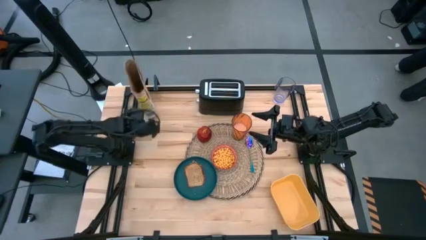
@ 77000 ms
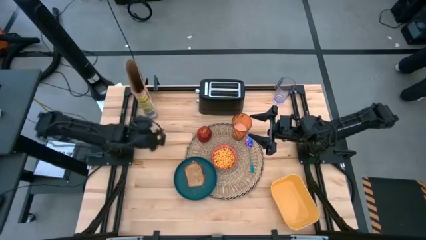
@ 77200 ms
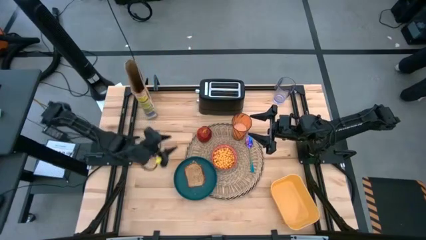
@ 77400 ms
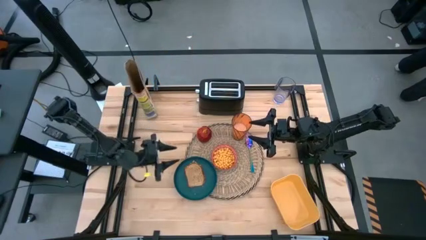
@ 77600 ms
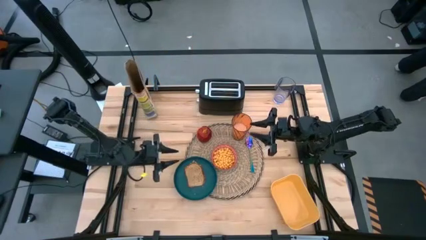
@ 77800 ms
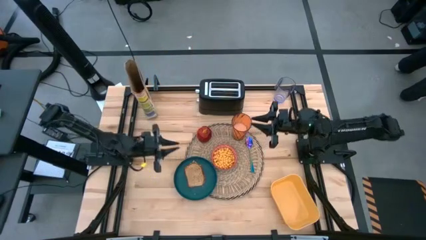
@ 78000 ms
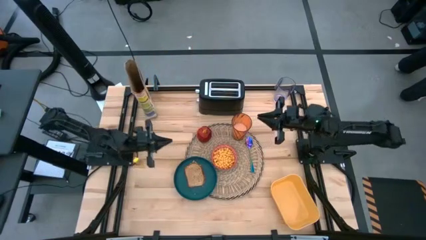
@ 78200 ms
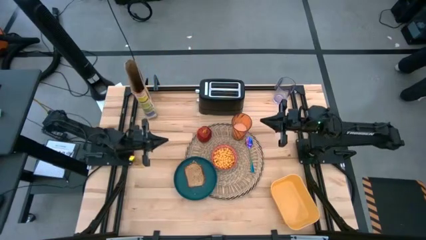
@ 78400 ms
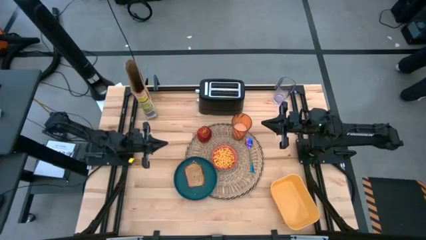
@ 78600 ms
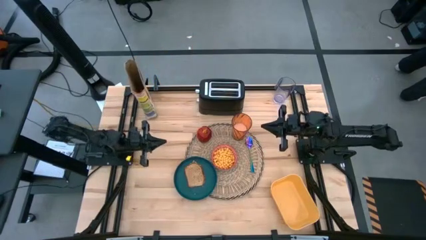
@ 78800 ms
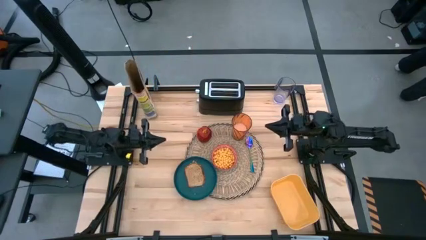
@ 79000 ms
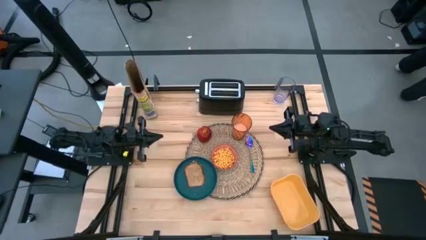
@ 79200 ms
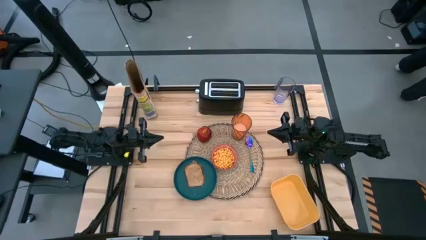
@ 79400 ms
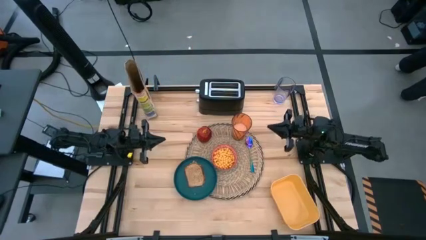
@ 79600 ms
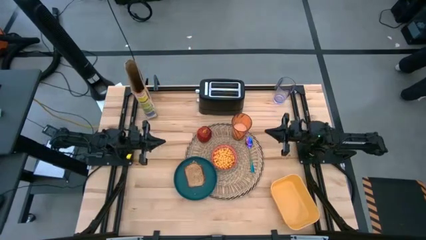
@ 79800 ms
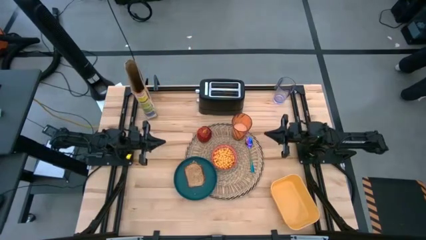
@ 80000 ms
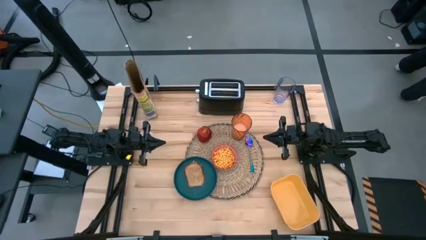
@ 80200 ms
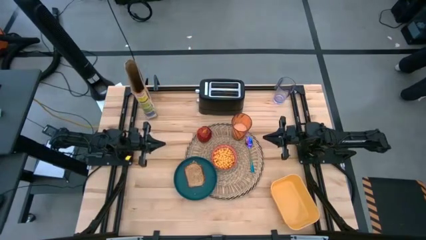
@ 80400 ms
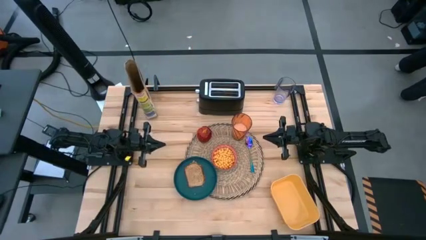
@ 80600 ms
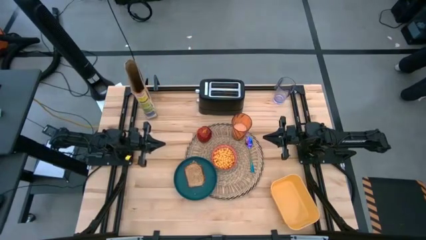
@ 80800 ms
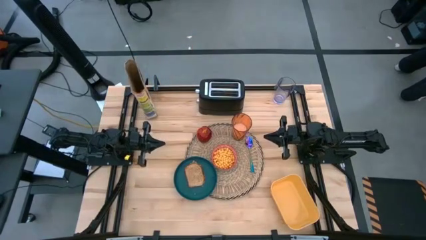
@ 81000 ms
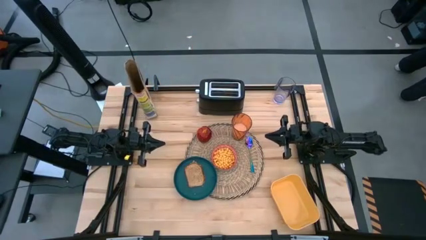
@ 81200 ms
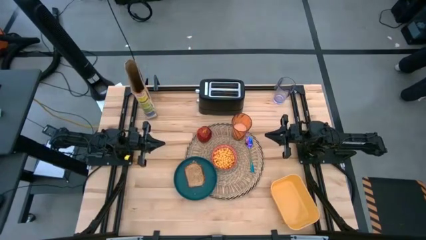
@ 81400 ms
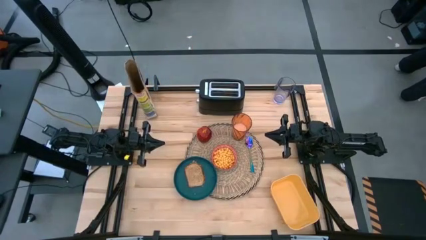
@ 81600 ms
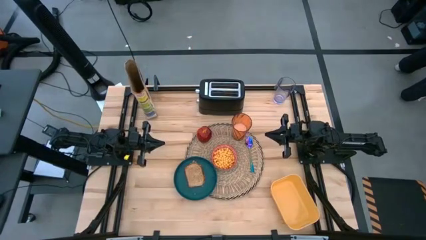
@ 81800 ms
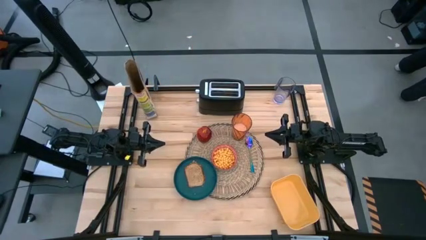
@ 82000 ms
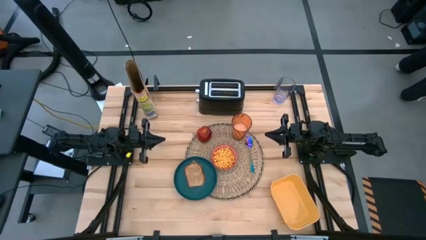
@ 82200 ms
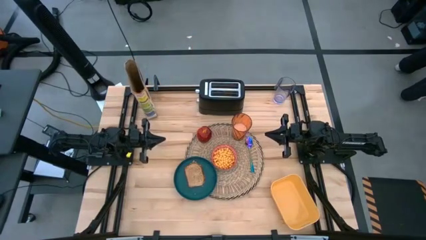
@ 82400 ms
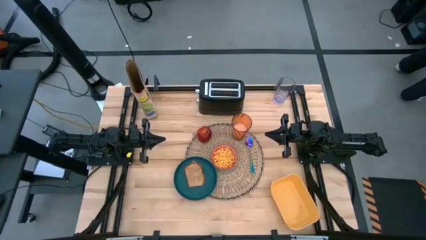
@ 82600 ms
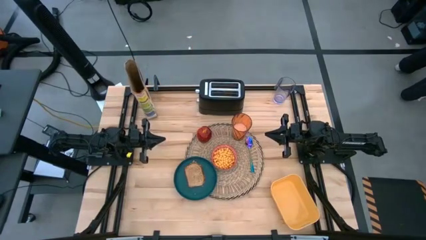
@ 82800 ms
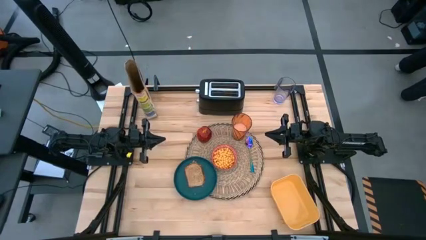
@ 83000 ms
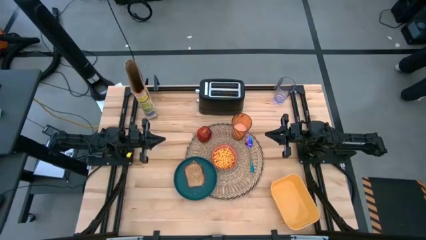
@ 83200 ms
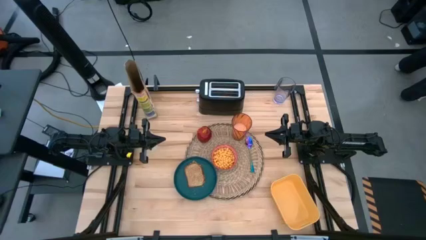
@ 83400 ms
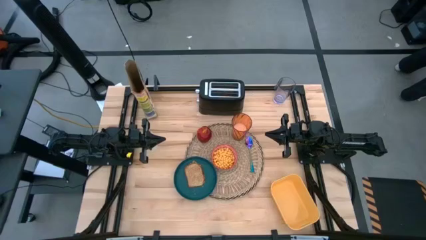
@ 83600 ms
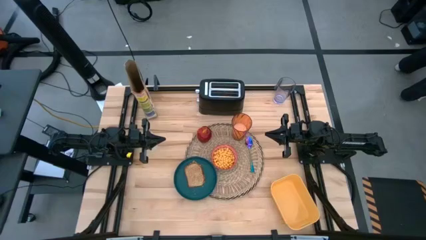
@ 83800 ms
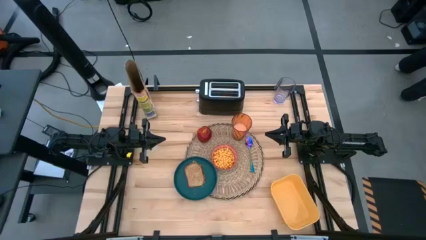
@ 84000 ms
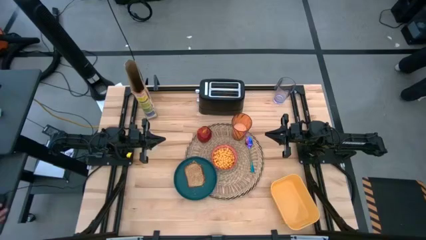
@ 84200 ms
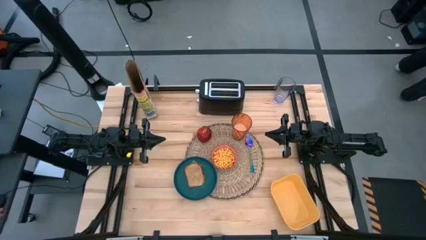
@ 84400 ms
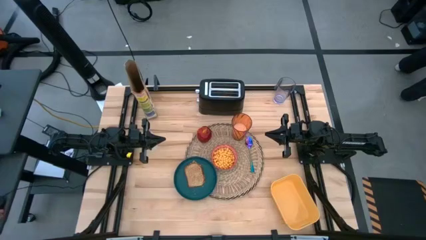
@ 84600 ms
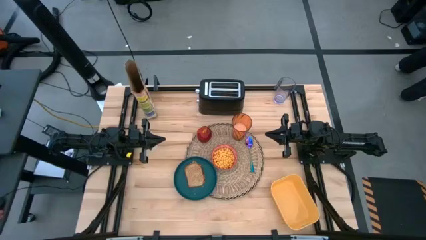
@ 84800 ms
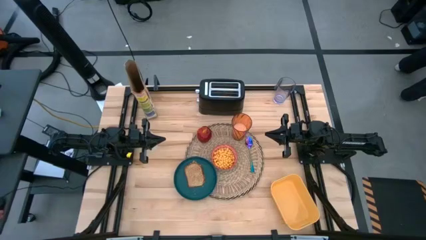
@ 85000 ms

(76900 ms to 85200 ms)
Task: Arrange a breakfast setting
Return to Home Position

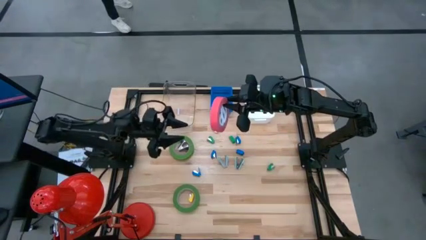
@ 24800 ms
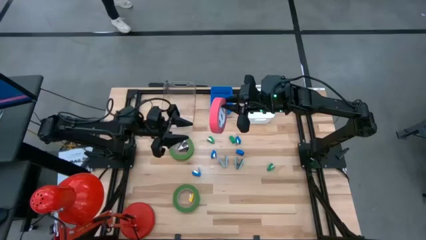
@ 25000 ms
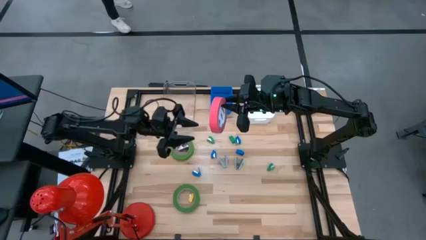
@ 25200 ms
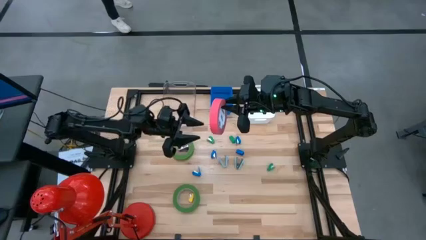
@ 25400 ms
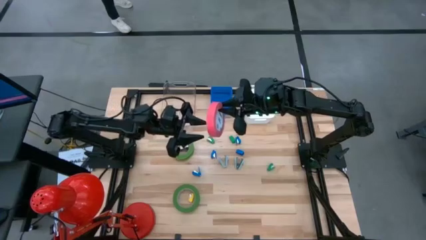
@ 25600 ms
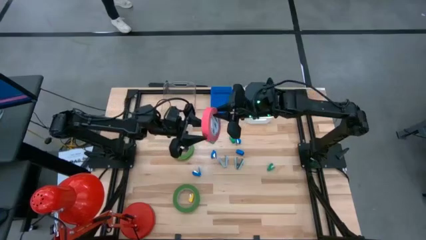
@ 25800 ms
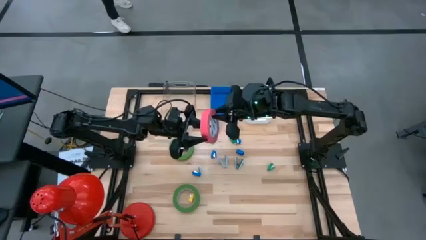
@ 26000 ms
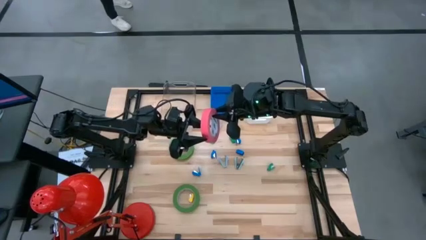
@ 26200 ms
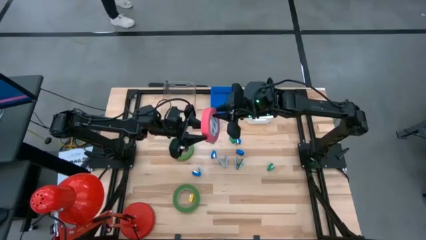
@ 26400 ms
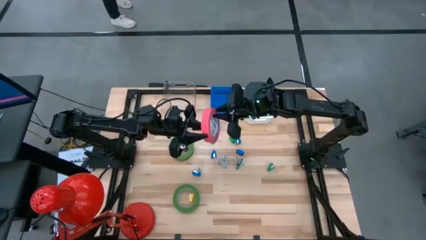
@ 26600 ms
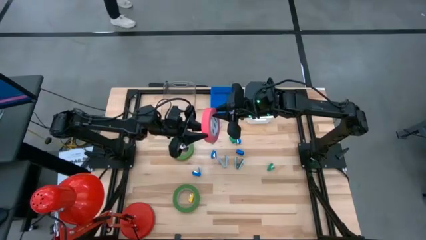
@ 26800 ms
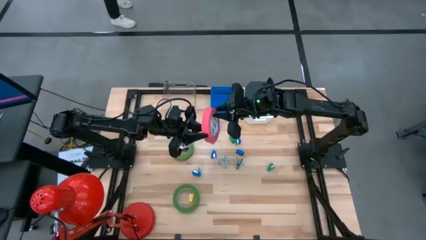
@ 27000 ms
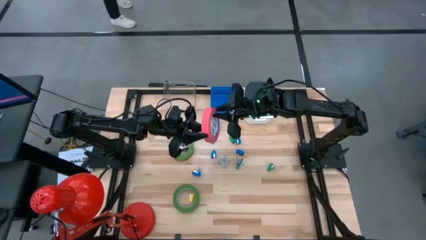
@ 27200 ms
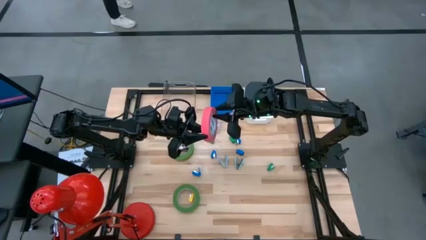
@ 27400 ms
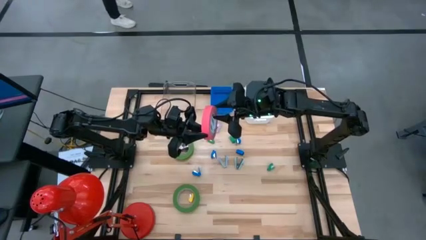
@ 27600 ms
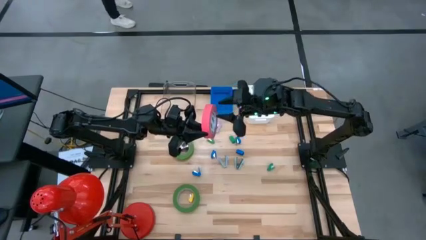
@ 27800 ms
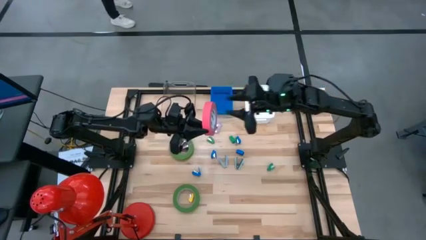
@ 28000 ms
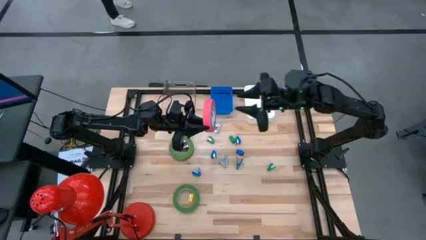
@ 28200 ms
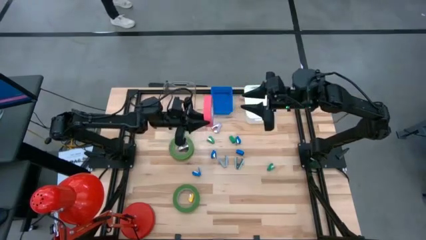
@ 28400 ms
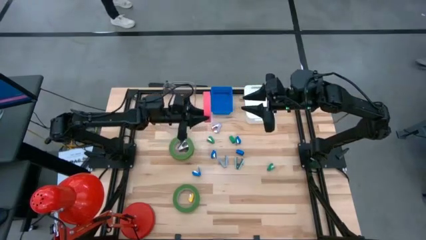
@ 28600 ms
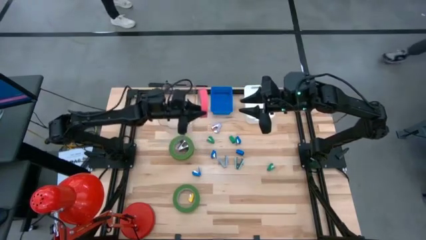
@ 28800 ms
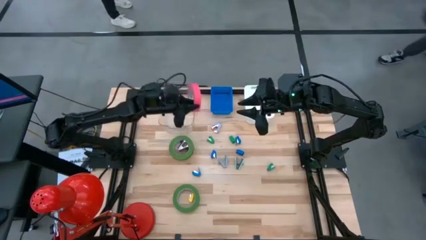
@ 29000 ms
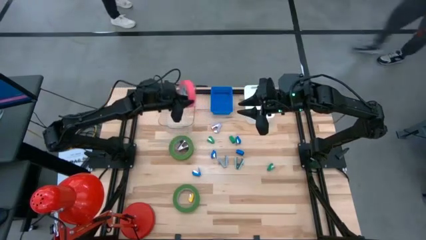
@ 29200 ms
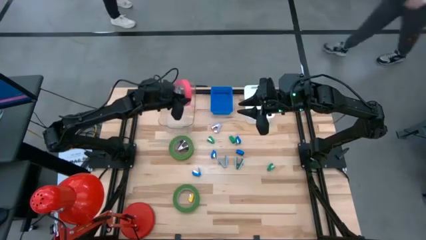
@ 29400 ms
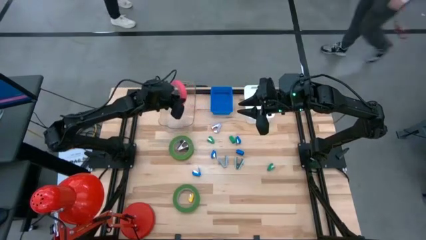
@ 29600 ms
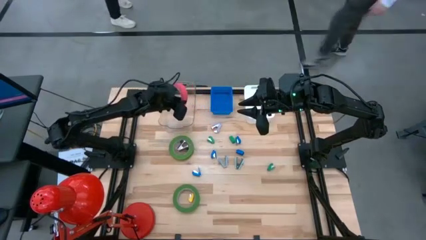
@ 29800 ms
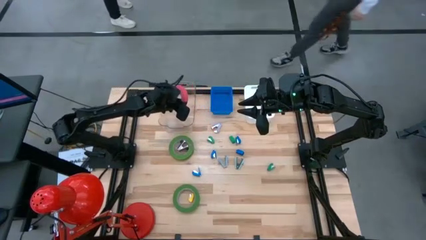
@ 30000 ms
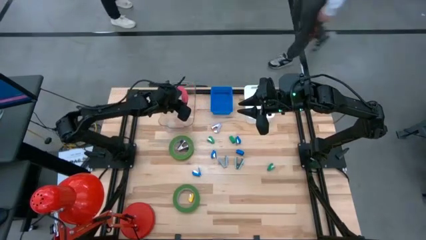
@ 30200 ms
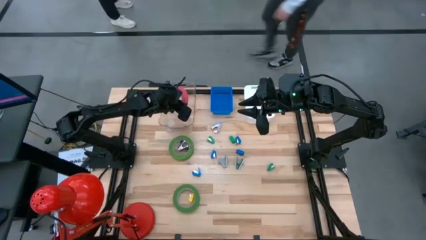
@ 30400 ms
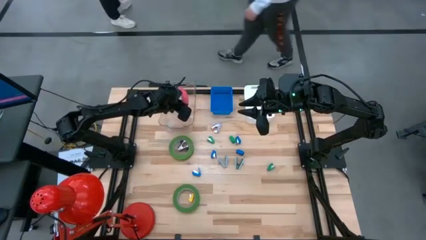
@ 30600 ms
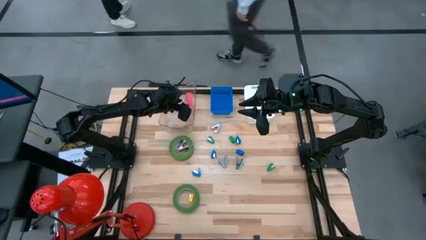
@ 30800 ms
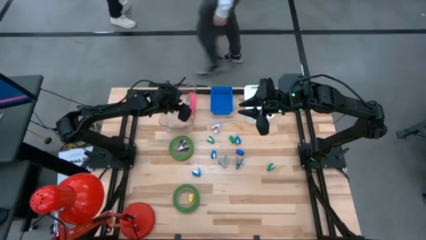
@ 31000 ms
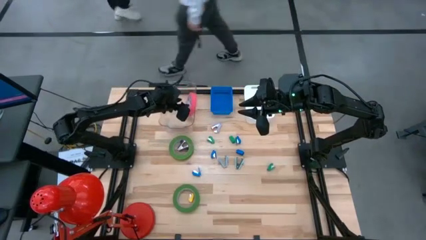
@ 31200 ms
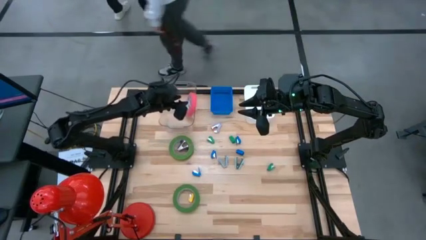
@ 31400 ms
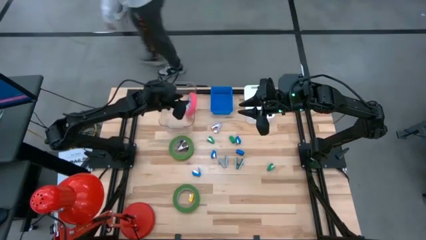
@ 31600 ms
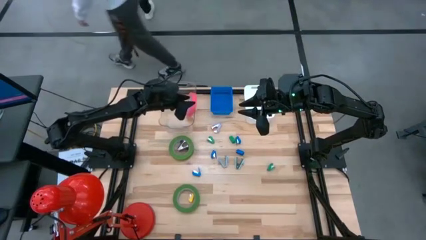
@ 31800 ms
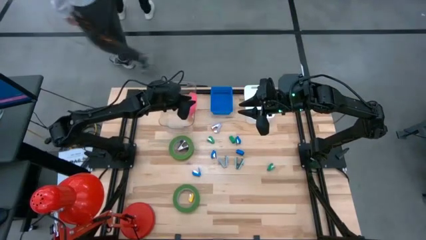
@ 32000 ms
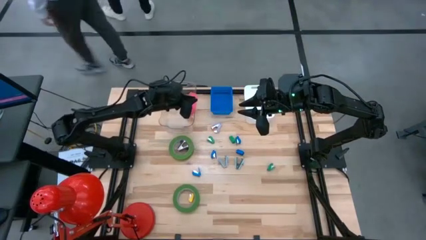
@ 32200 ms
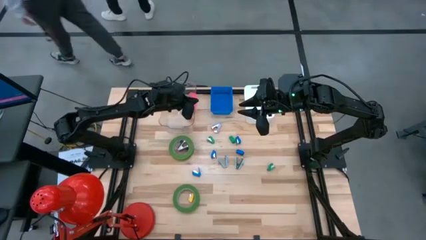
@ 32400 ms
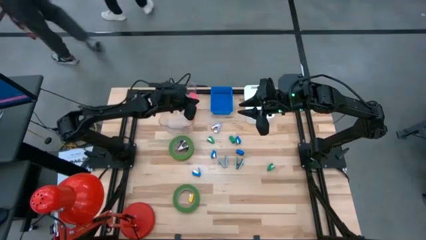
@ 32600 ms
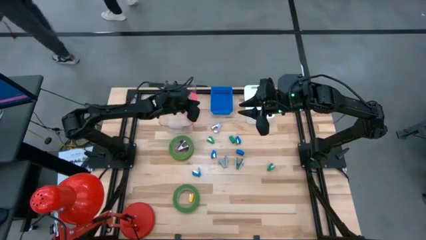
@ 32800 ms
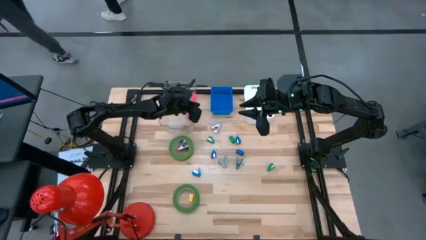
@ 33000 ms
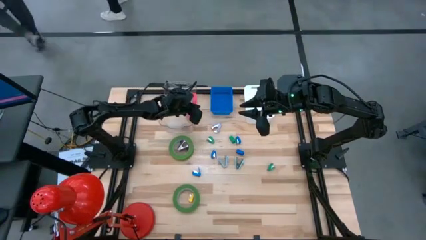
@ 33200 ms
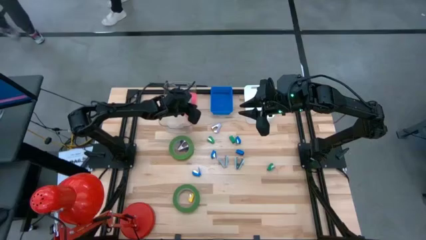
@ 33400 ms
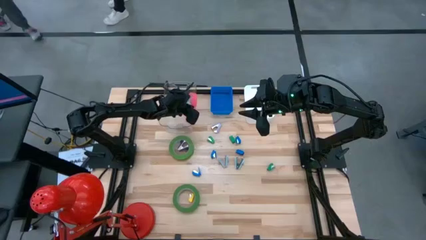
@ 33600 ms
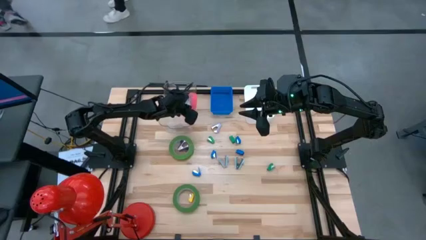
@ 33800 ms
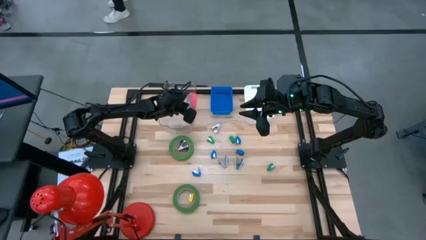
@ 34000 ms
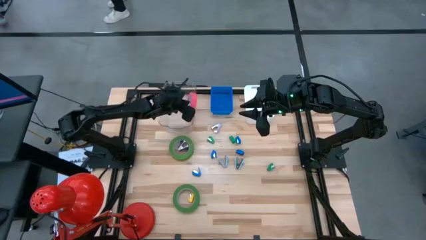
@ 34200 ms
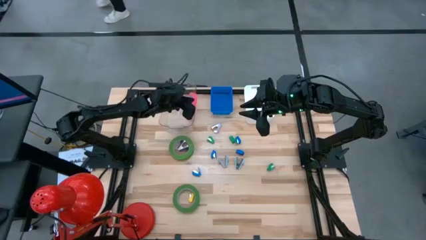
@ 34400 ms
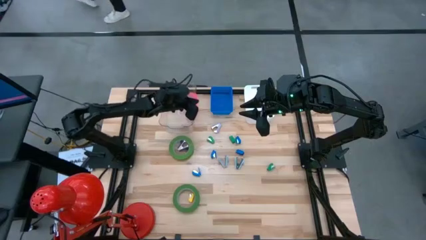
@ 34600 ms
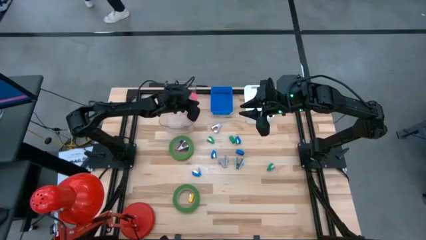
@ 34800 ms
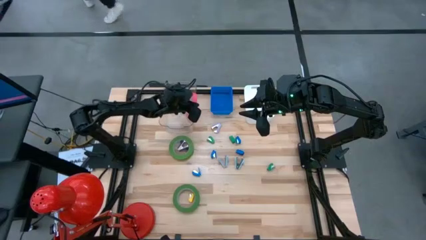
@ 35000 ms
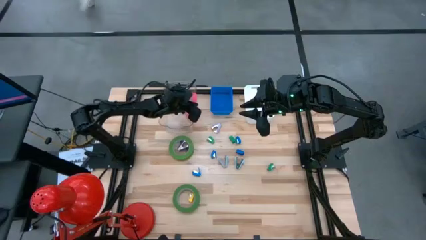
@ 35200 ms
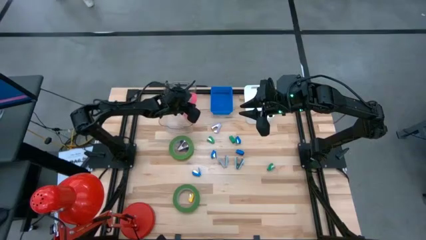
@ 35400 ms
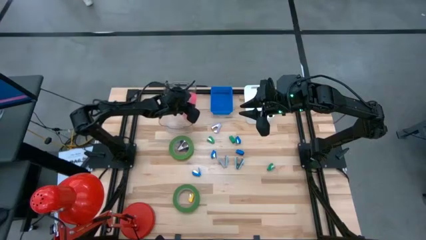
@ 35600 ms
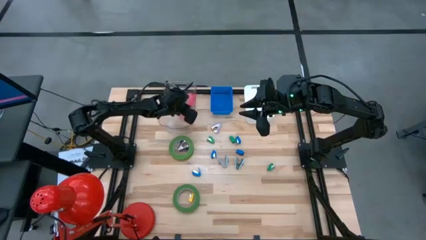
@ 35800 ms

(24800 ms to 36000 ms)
Task: Pick and place Stapler, Stapler remover, tape
Put the pink tape into the transparent bin
